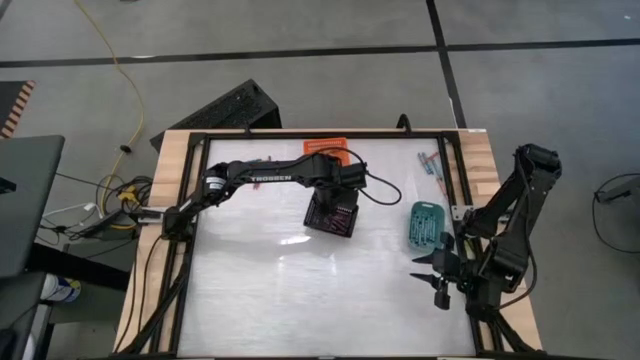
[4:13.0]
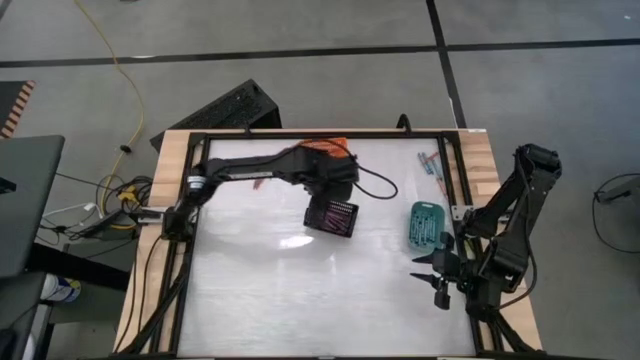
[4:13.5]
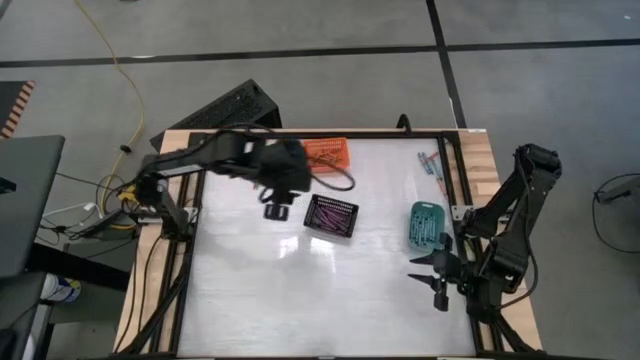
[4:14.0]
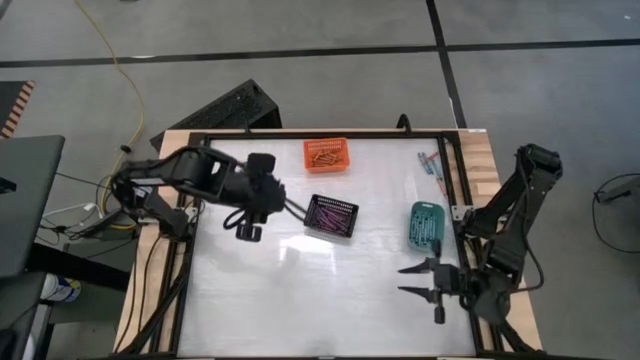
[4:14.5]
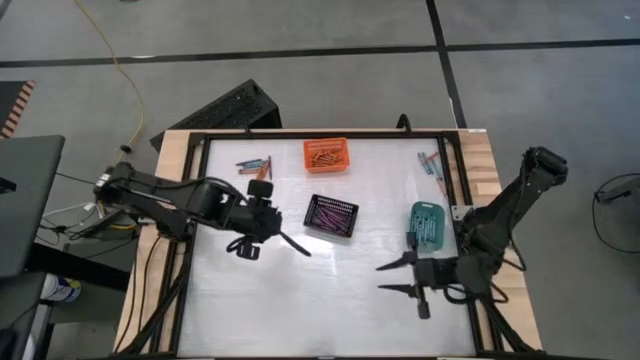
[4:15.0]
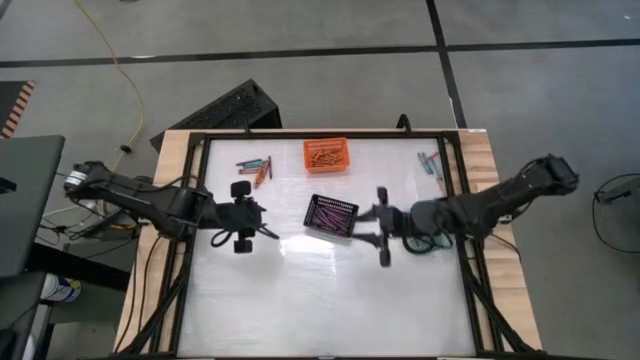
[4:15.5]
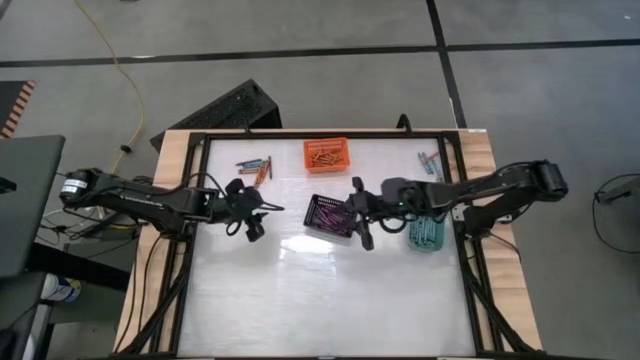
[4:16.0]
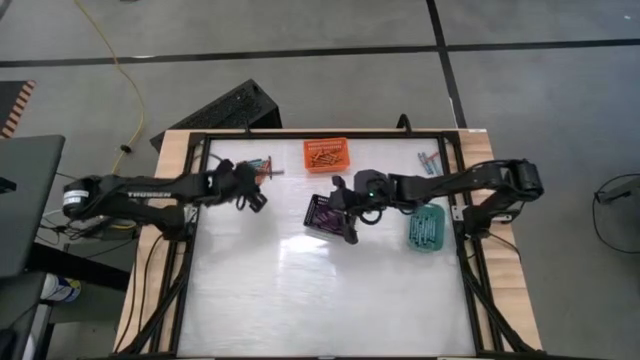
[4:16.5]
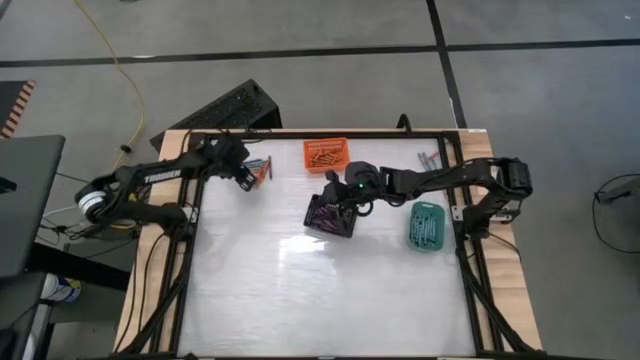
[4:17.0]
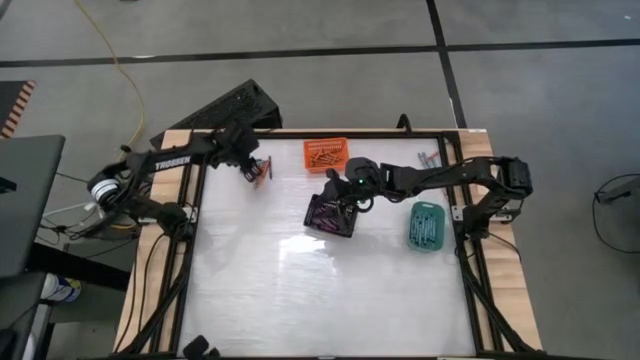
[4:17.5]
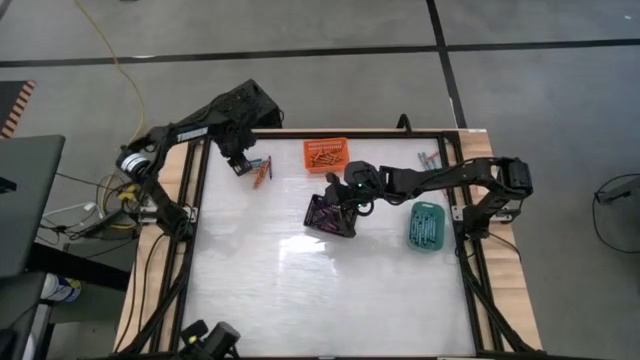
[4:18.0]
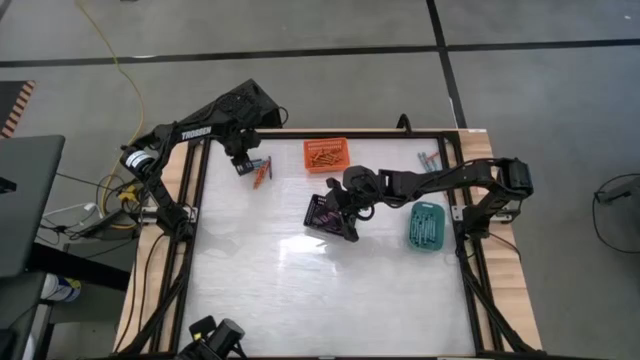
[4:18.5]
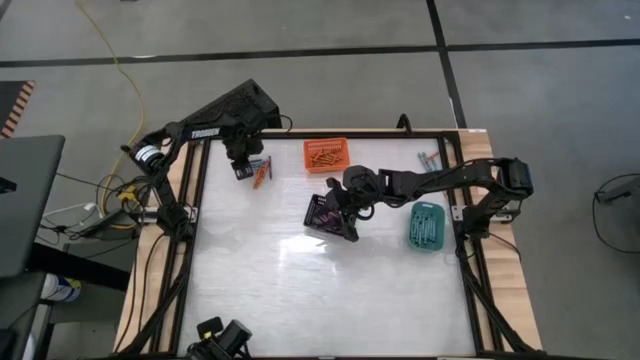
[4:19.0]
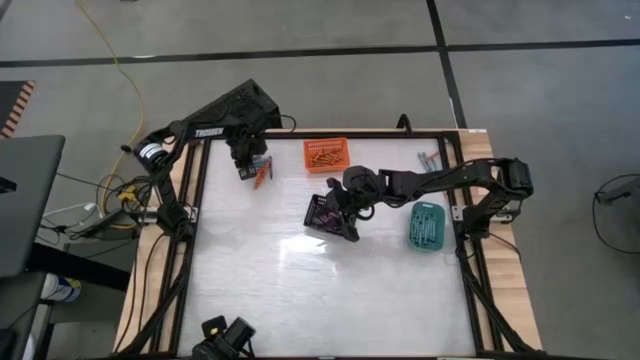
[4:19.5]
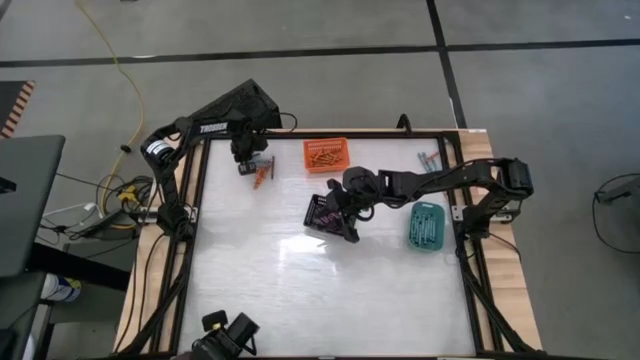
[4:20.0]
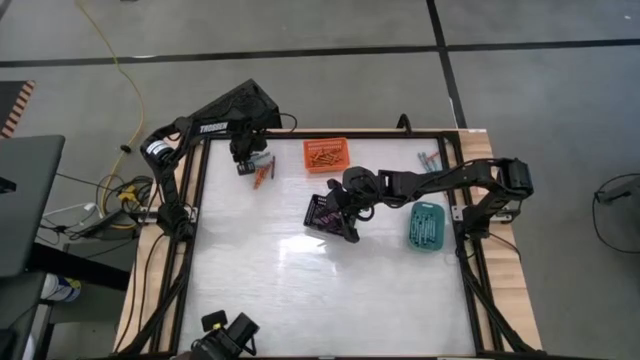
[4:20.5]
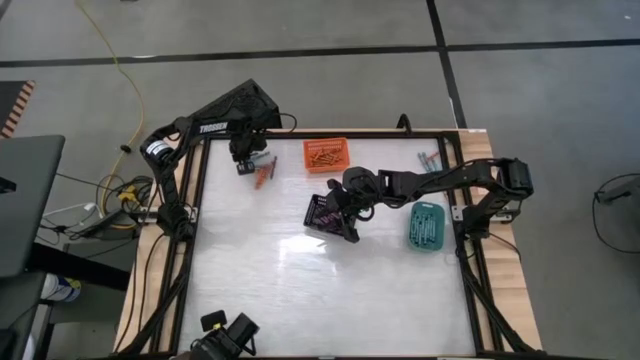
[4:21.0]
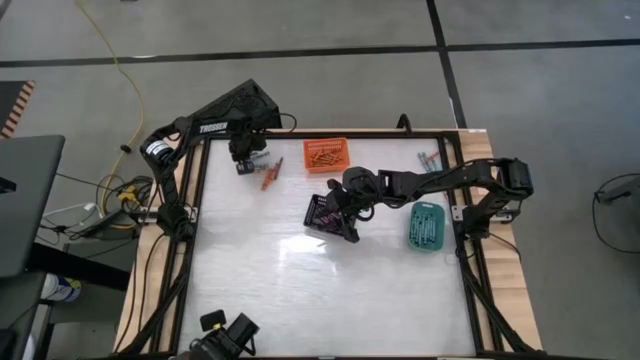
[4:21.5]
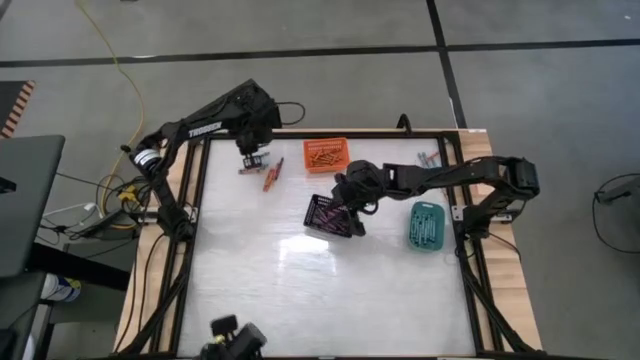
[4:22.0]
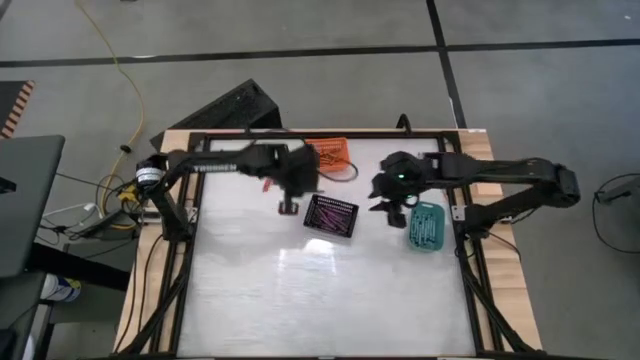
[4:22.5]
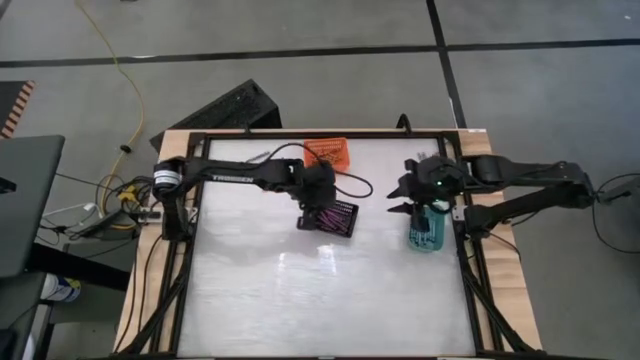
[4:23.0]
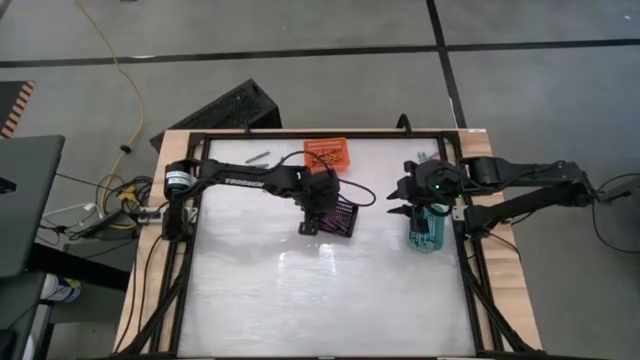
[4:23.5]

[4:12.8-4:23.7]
Task: Sort crayons
Put the violet crayon into the black bin

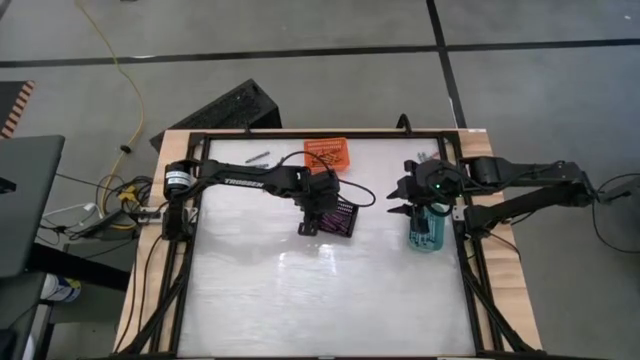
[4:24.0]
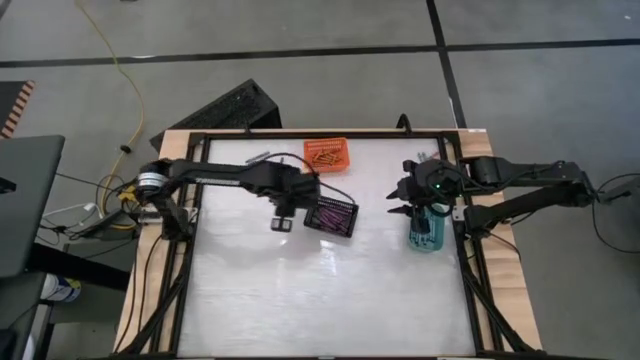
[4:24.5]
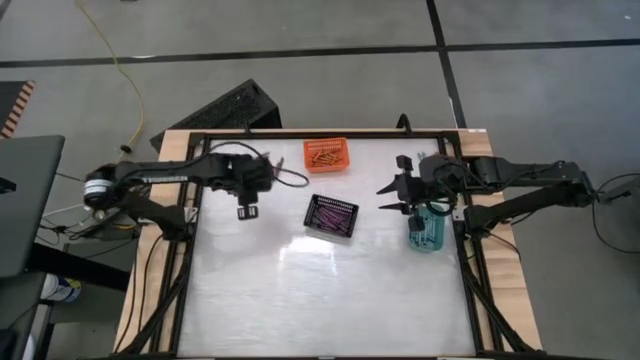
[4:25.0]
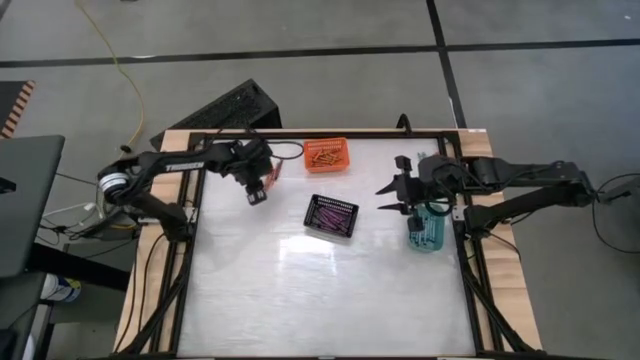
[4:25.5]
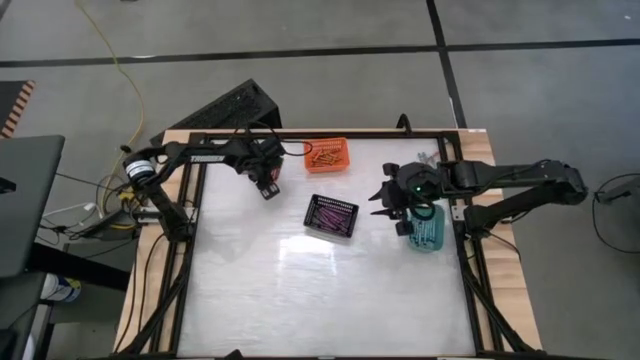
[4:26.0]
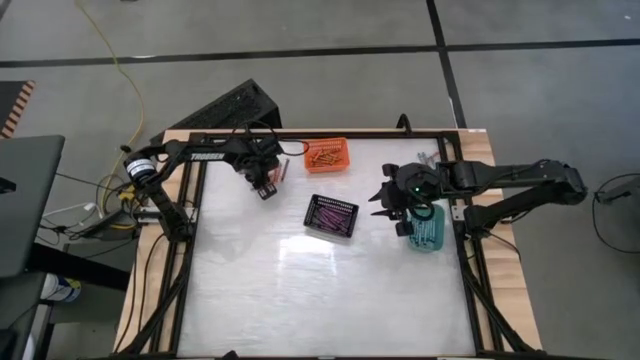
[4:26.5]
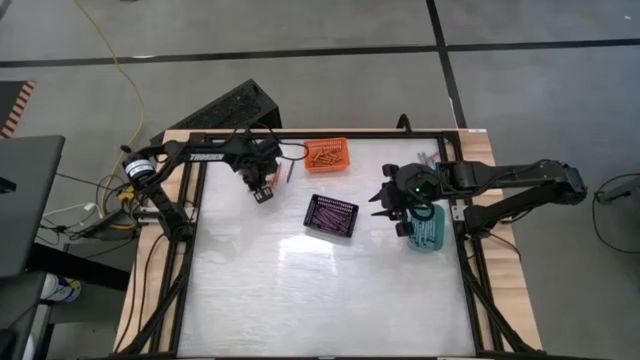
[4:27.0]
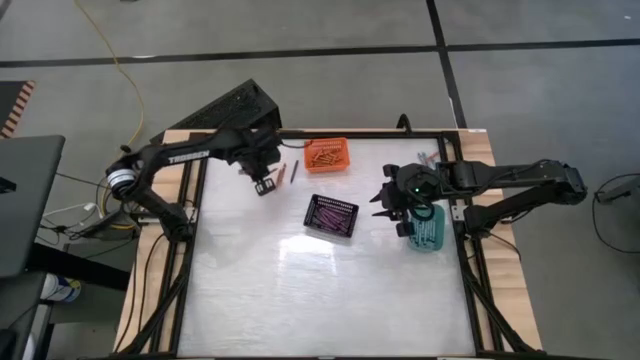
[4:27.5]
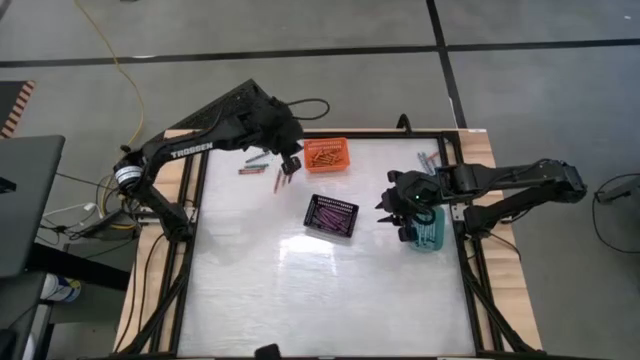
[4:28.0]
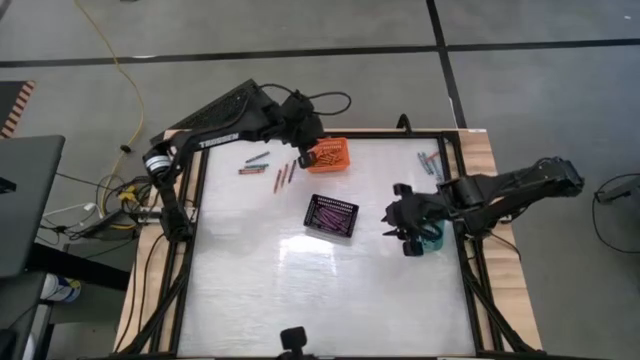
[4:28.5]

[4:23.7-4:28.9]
Put the orange crayon into the orange bin

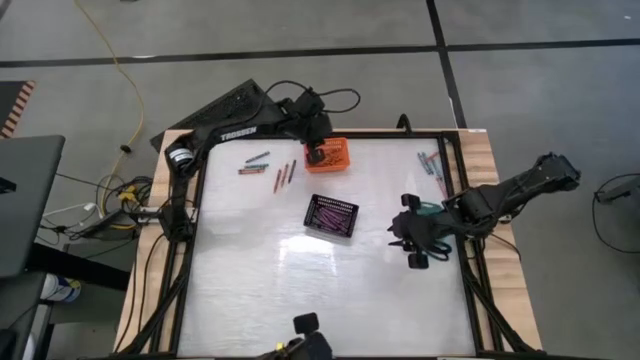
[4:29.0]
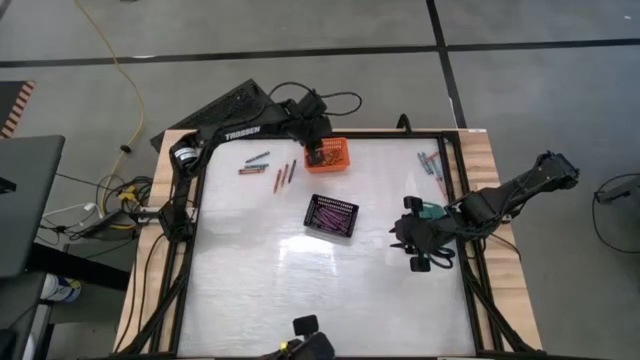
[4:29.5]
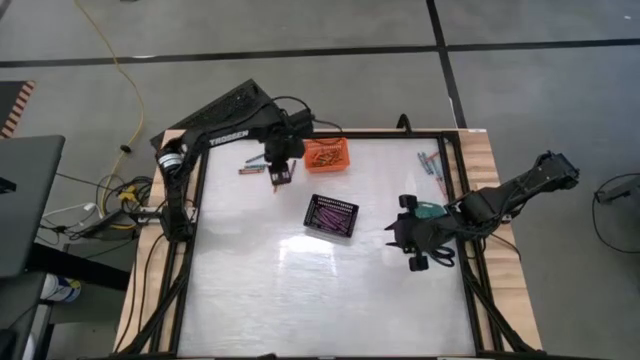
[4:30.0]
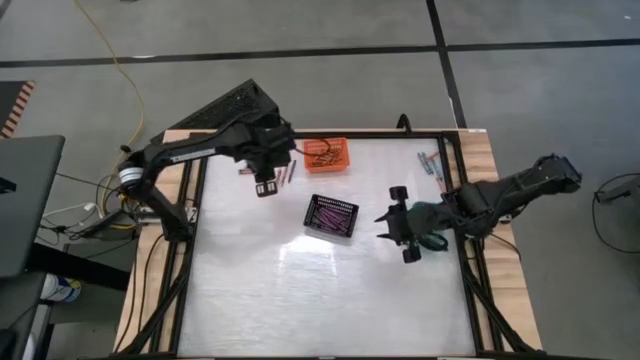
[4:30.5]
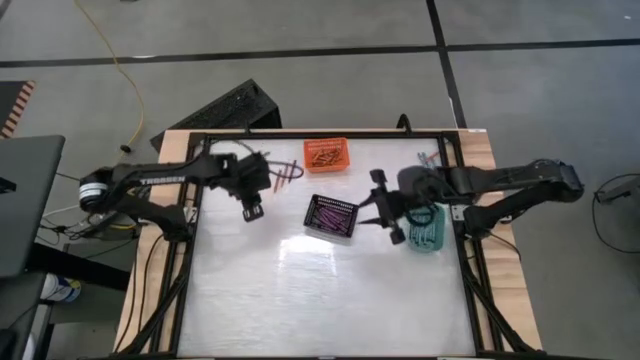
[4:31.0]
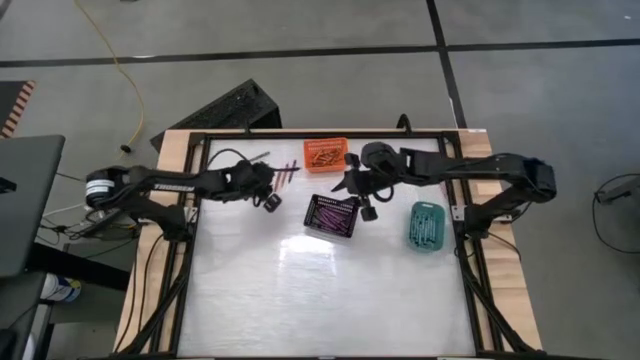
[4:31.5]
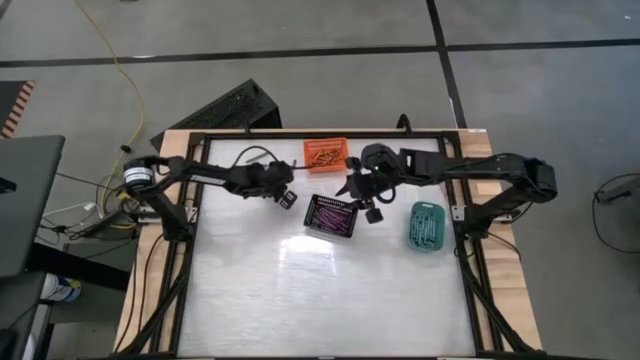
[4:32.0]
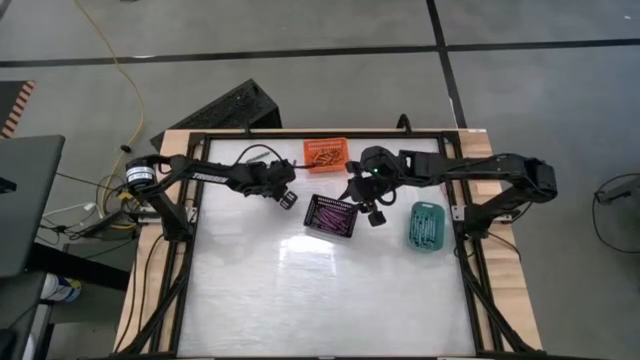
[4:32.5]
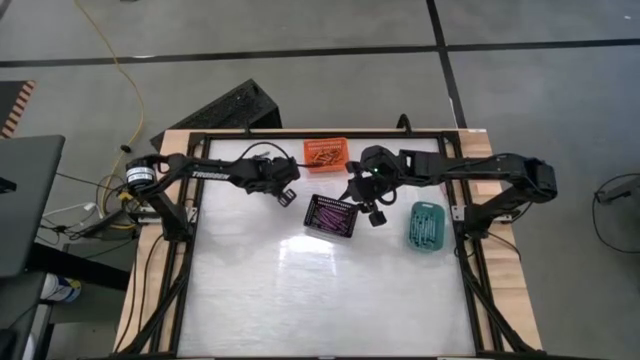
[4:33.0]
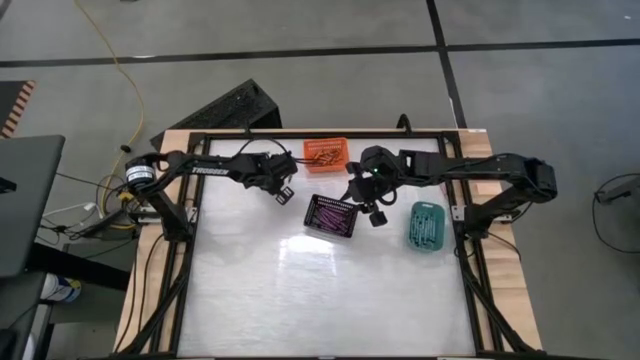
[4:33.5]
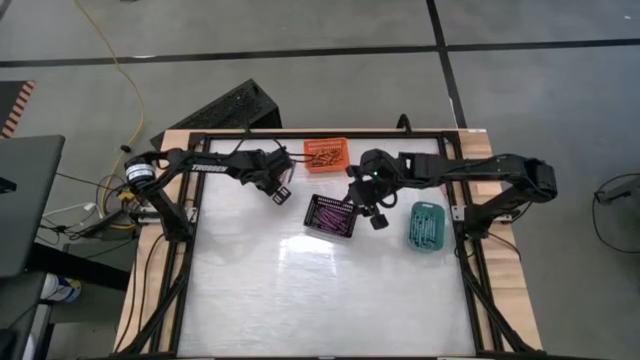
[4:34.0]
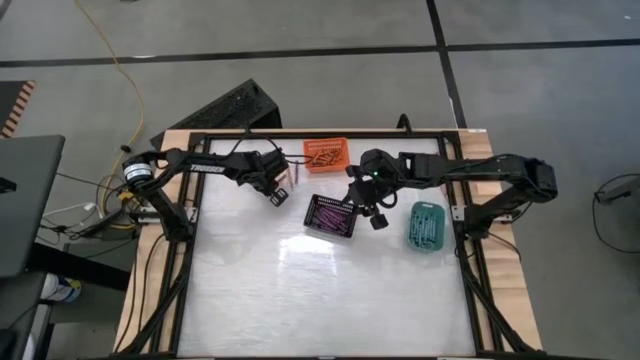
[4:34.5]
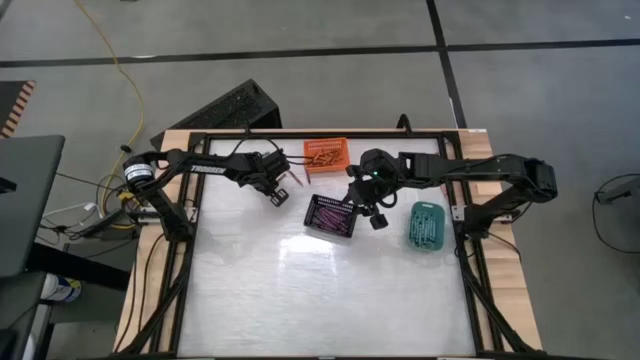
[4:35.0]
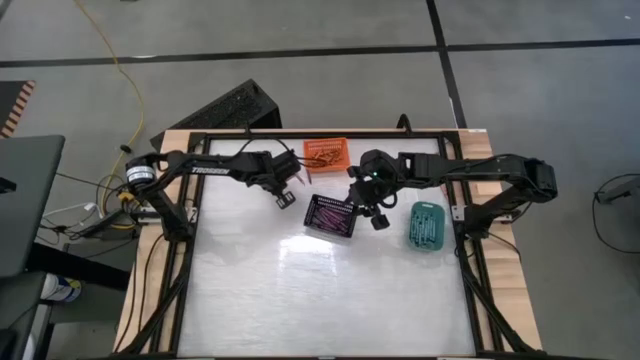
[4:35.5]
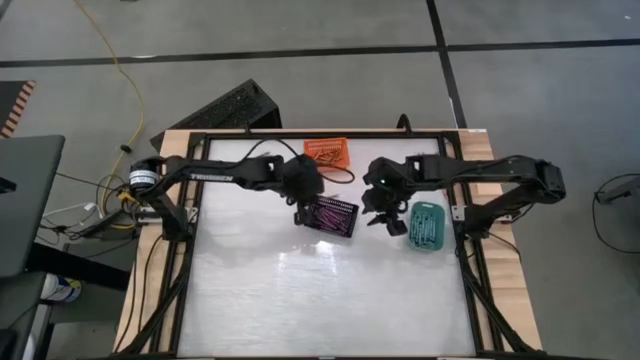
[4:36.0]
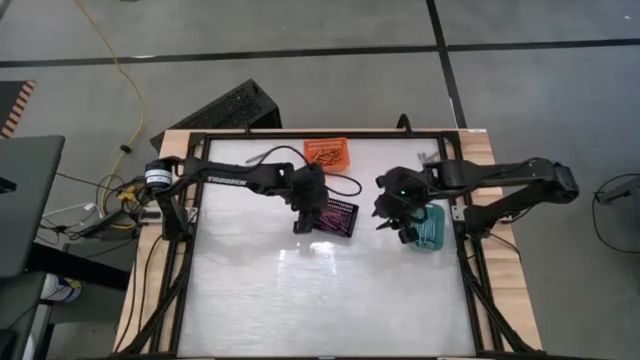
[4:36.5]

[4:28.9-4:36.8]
Put the orange crayon into the orange bin
